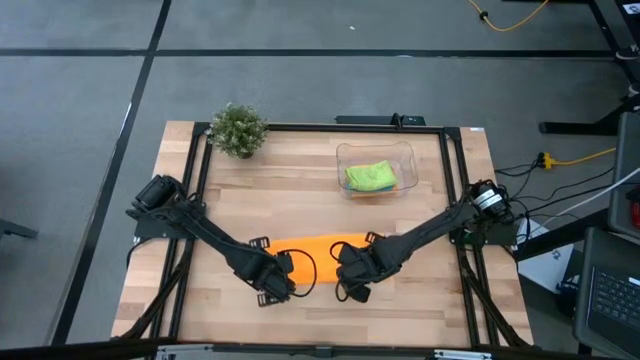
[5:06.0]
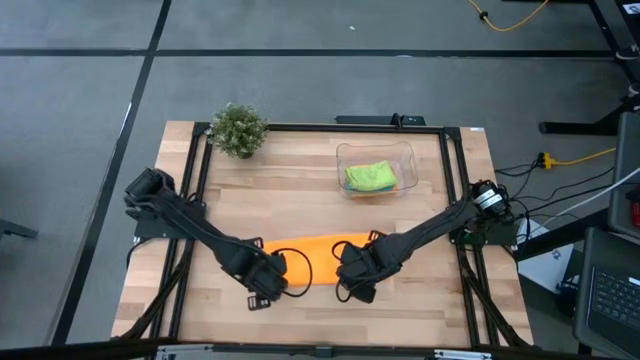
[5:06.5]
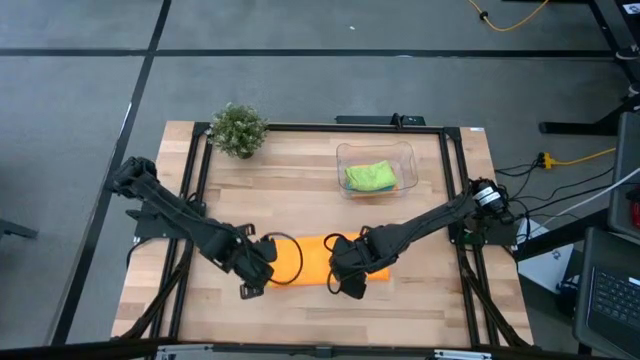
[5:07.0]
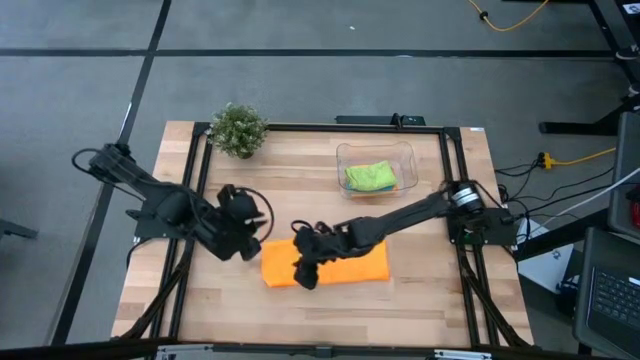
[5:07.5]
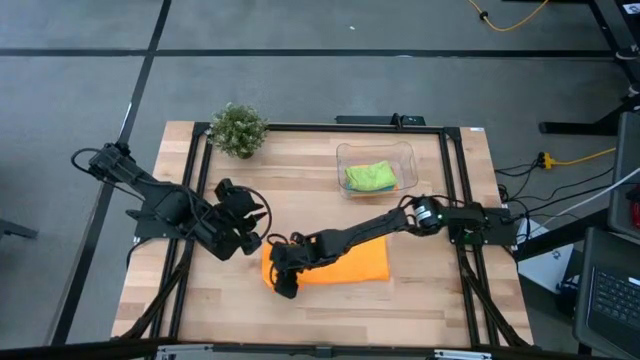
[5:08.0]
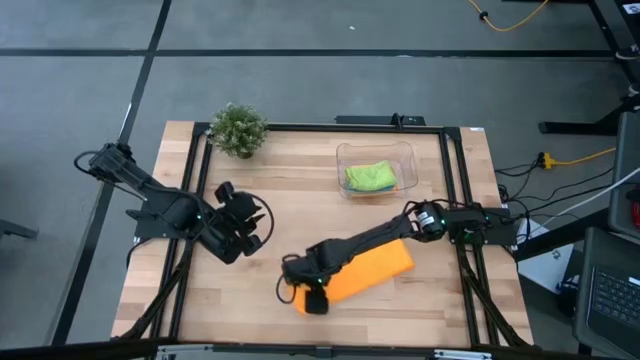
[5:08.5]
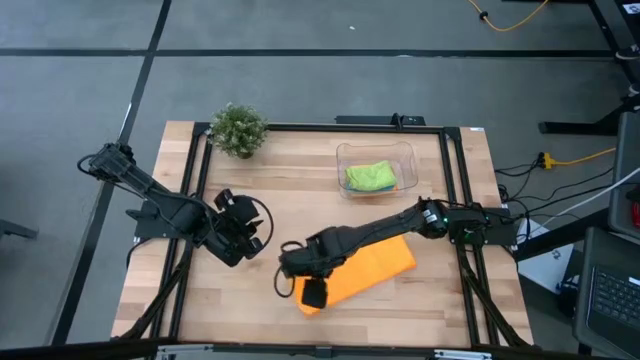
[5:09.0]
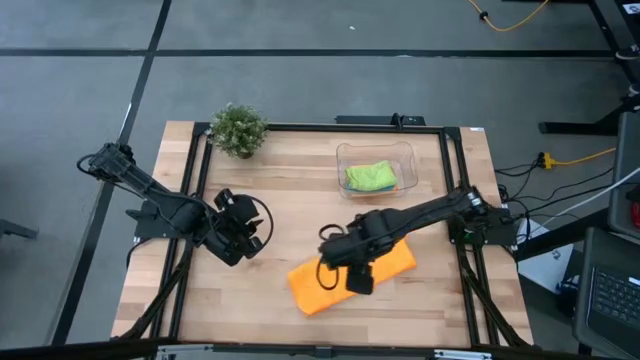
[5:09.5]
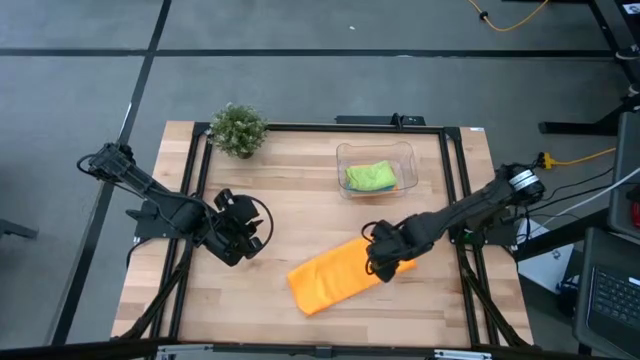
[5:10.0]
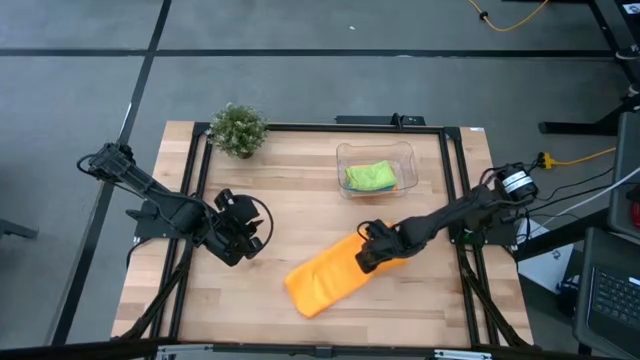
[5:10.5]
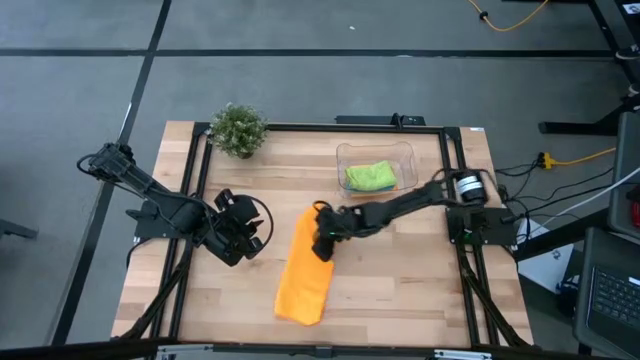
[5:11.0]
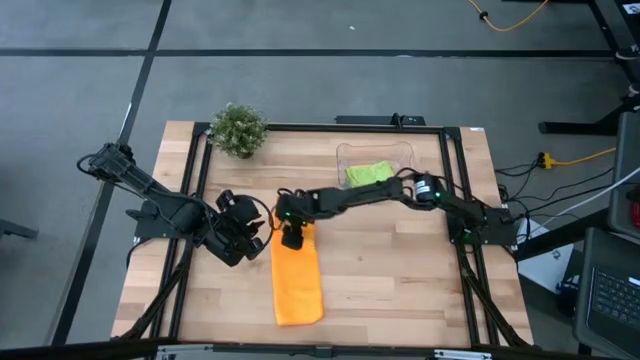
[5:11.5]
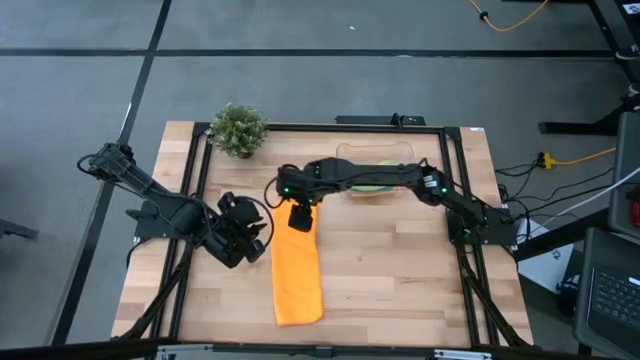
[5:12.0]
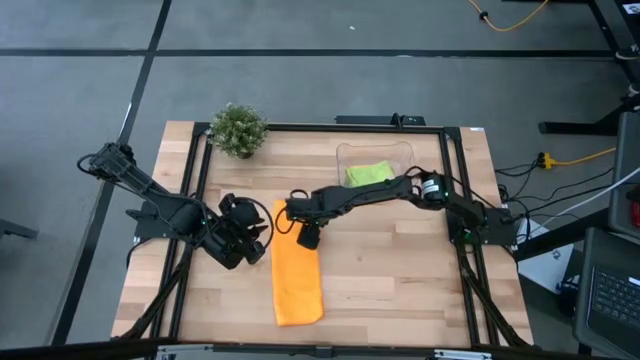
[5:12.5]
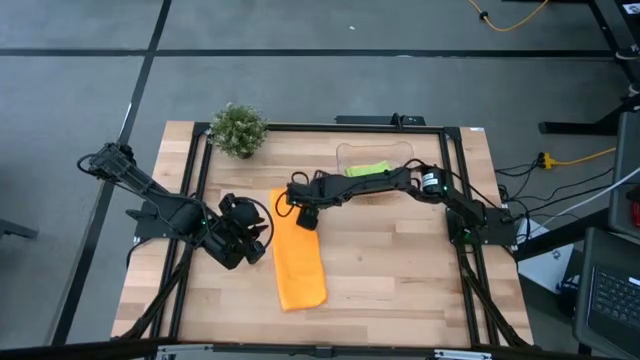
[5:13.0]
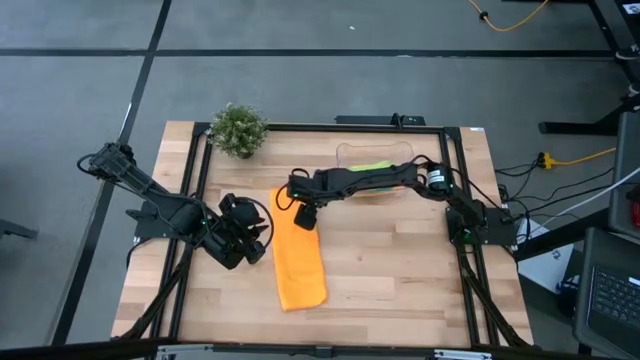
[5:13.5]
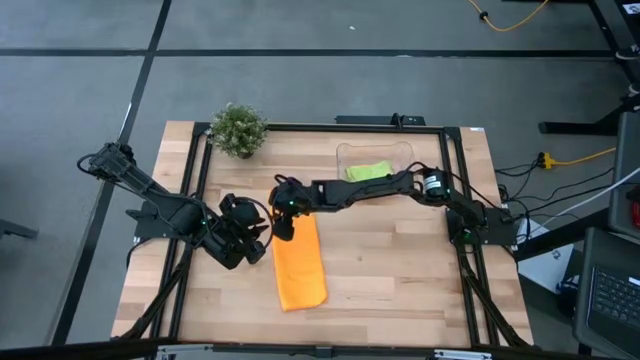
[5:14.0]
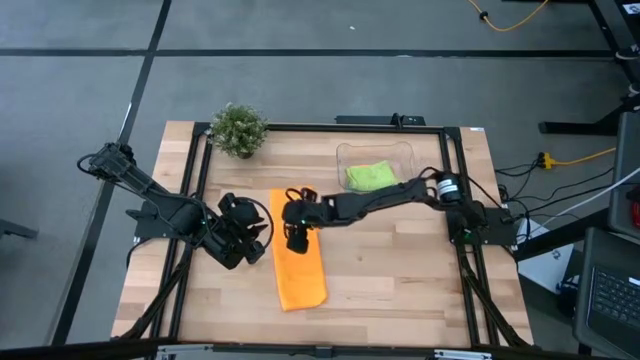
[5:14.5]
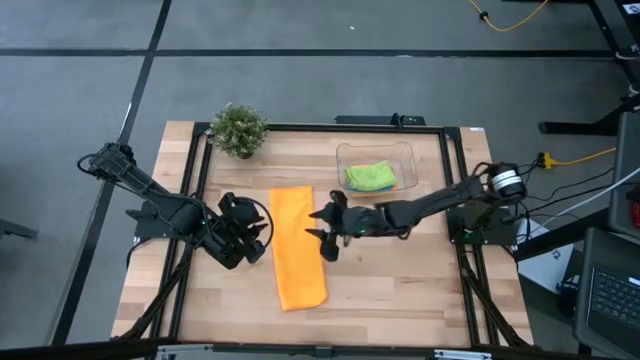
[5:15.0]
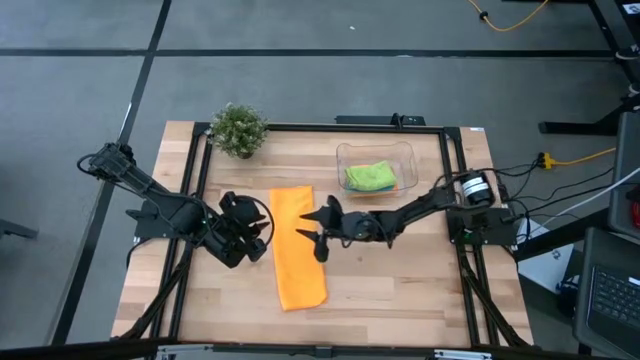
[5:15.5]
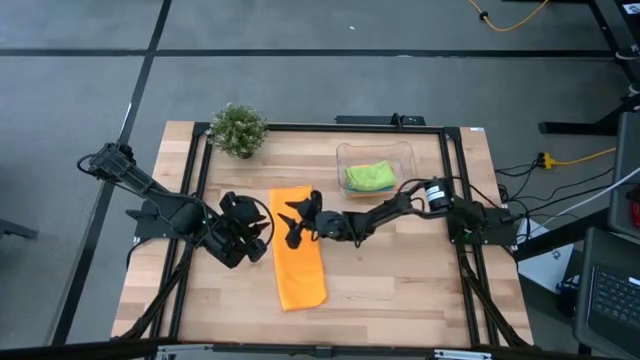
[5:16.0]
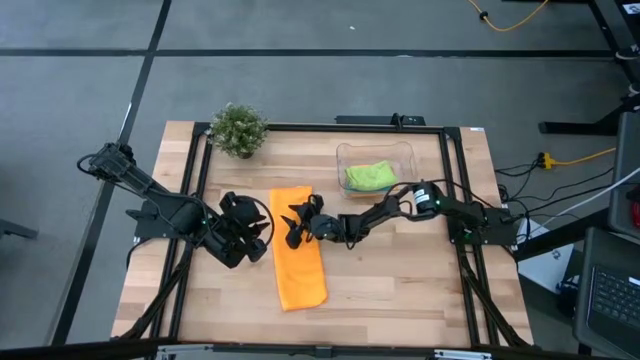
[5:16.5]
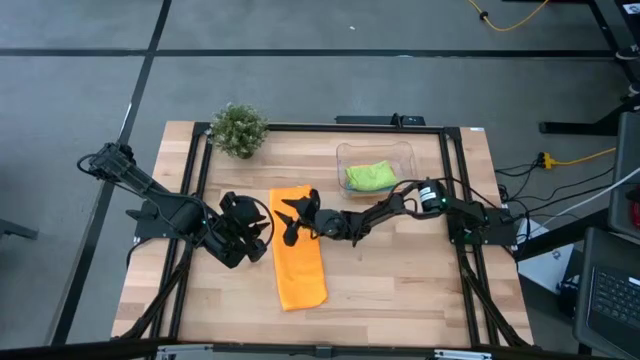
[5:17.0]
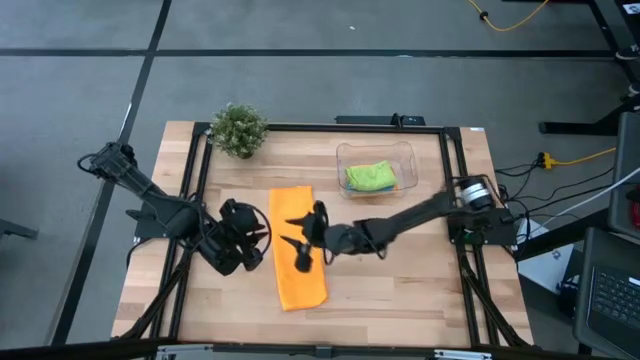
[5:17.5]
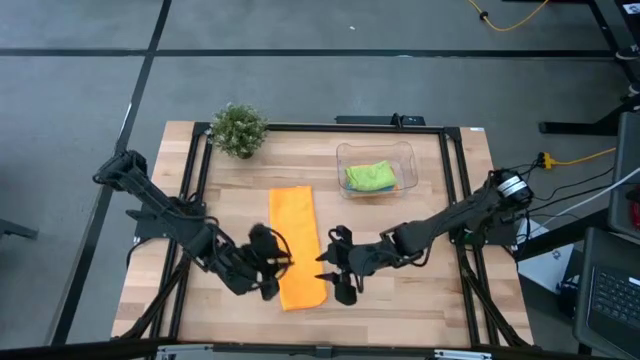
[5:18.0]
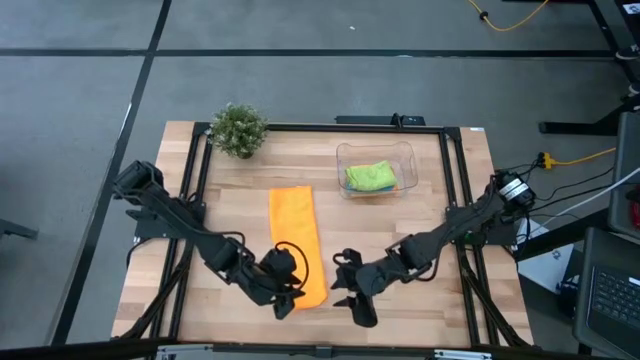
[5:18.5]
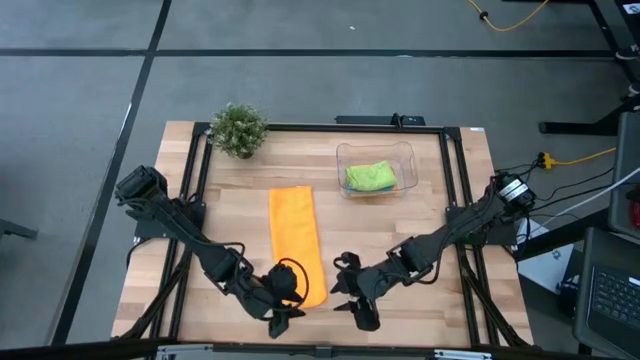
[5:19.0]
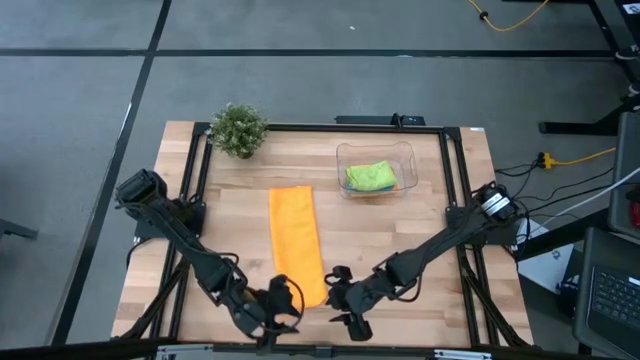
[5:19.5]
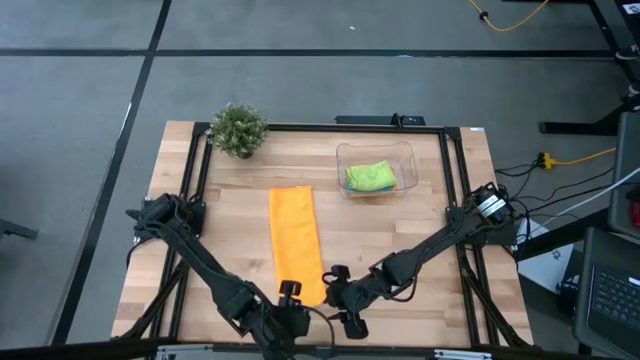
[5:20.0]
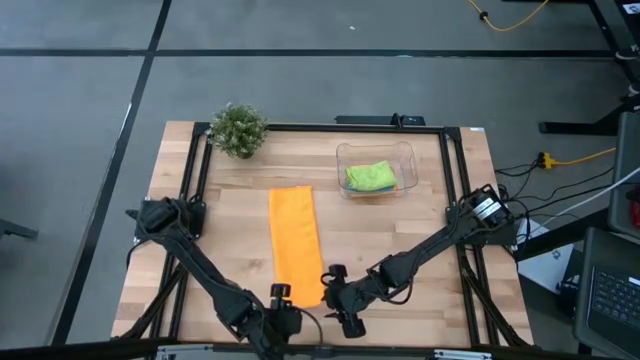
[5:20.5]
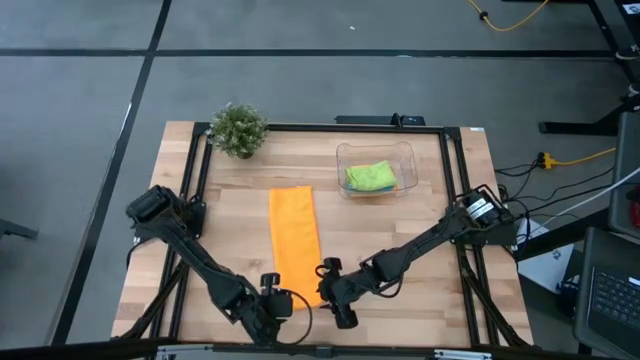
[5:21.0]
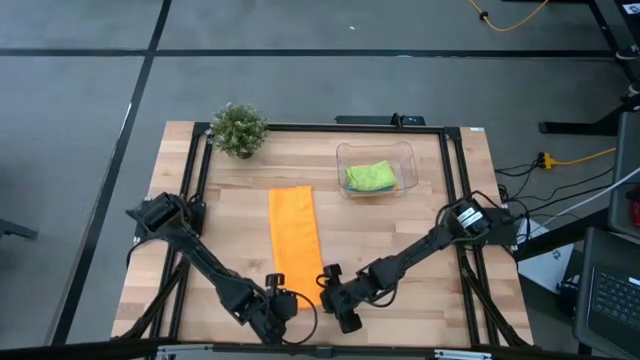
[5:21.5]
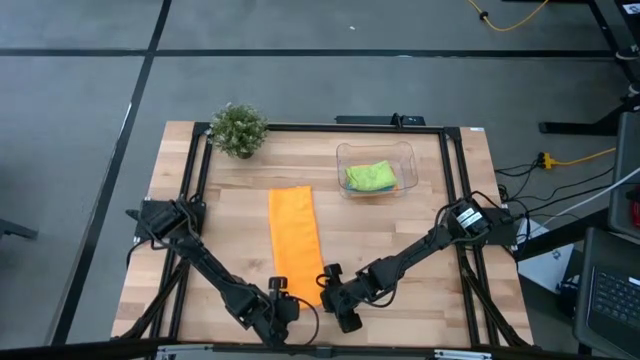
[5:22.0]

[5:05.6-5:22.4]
Task: Fold microfiber towels
Fold the orange microfiber cloth

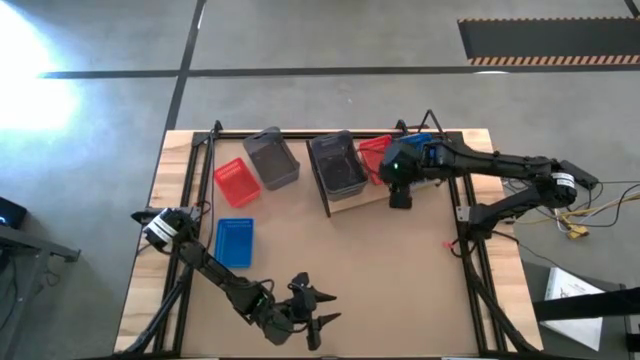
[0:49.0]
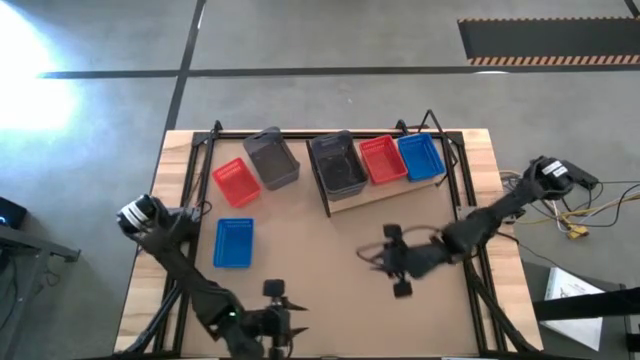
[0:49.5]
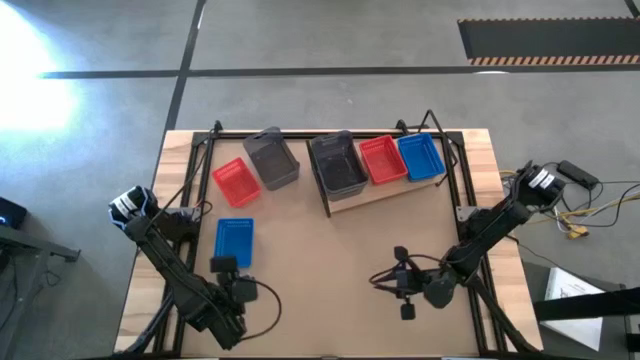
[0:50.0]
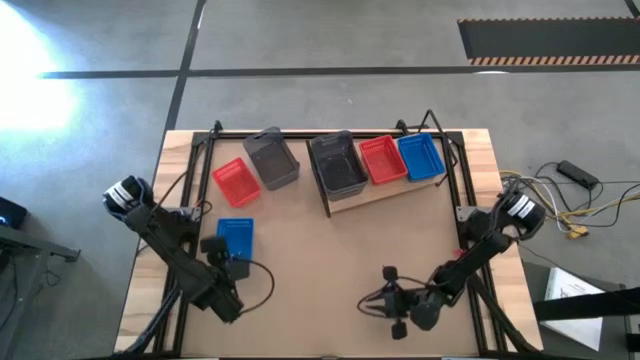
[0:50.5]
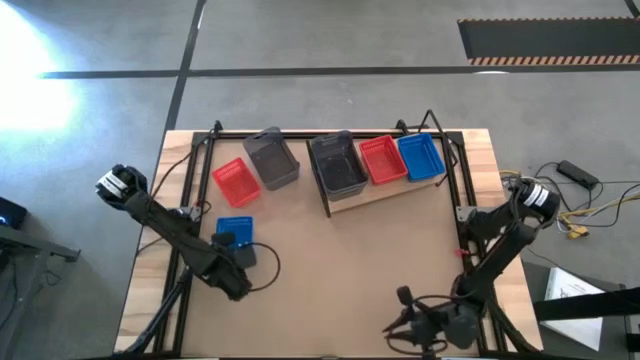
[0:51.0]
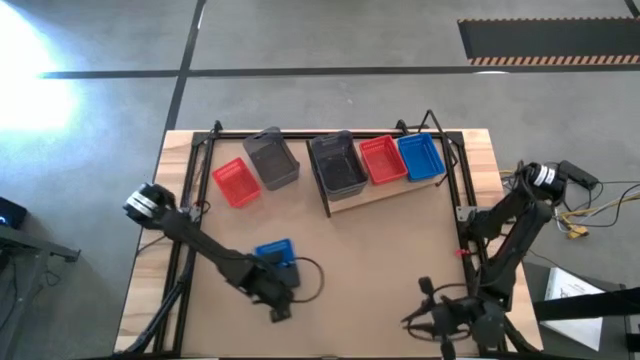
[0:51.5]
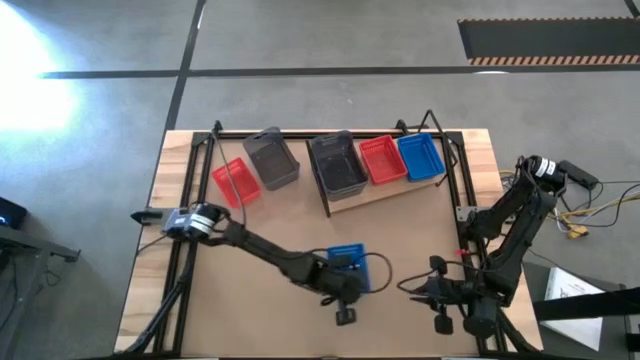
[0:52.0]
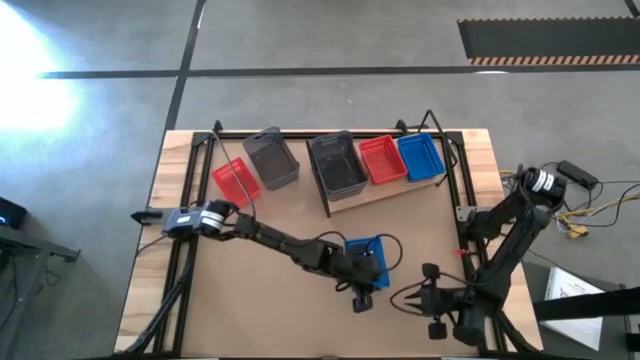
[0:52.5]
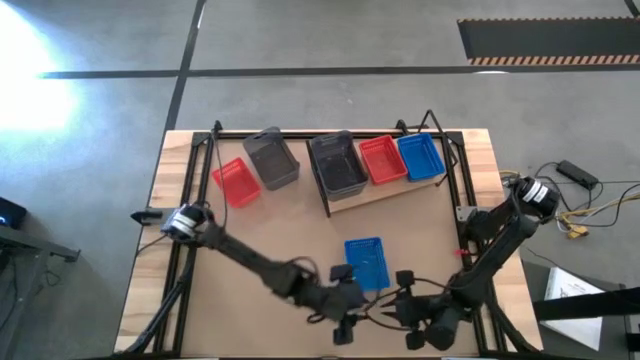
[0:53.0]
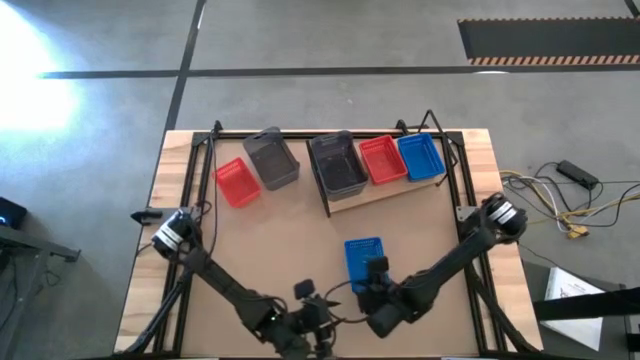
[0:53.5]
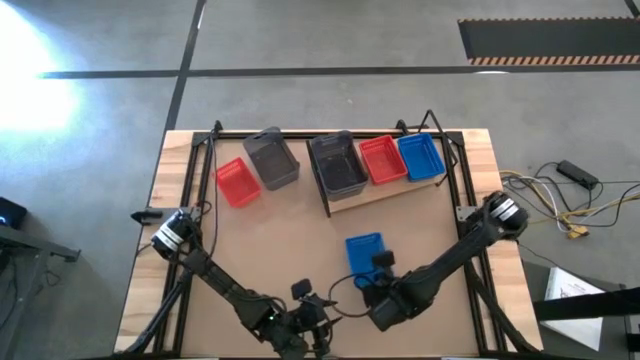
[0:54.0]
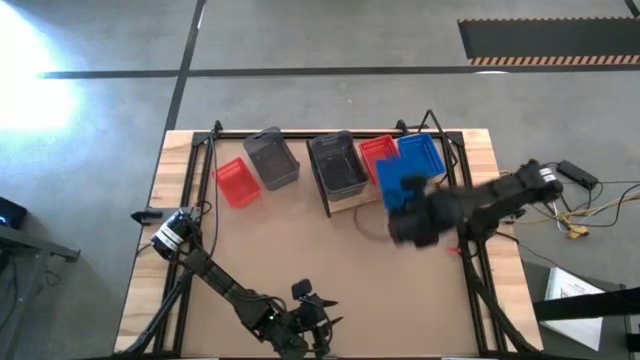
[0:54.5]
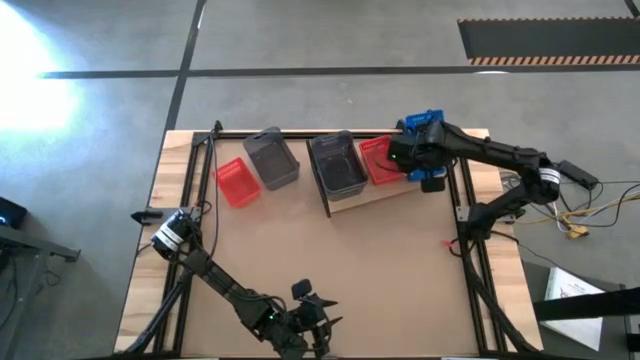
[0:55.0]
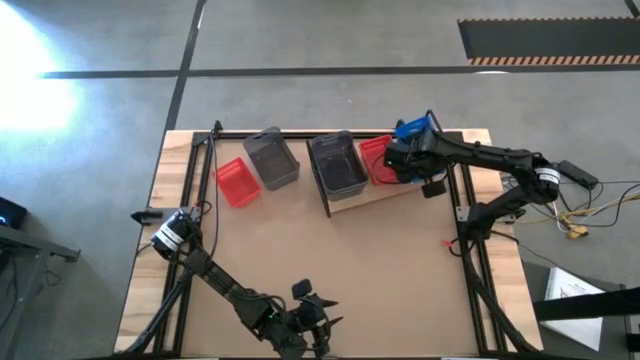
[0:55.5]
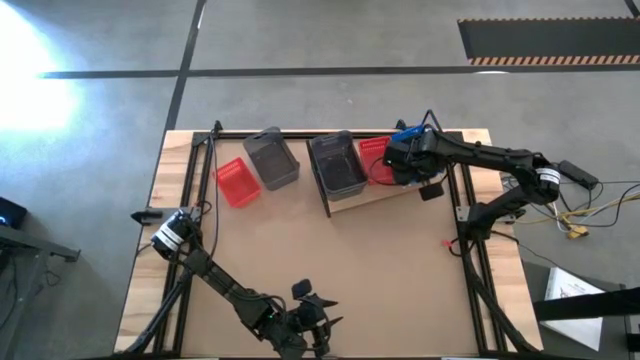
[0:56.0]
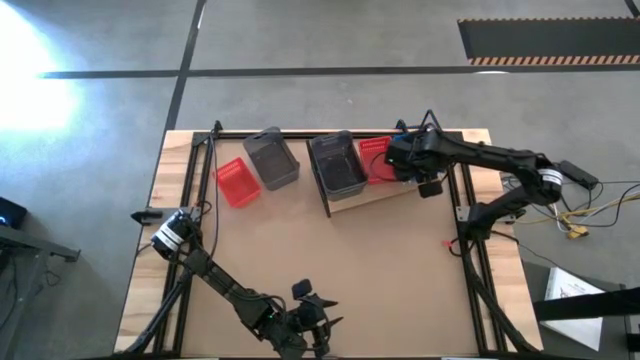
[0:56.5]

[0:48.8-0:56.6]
Task: Stack baskets on shelf by color
Stack the blue bin on the other blue bin on the shelf
